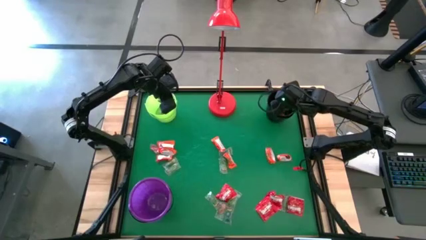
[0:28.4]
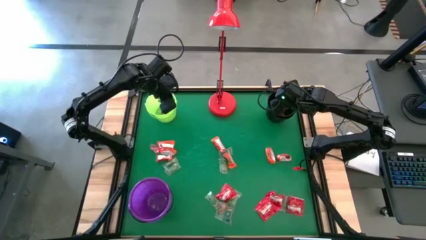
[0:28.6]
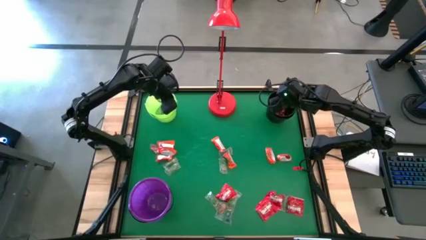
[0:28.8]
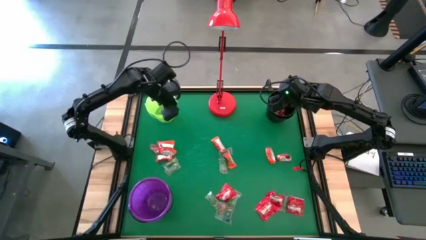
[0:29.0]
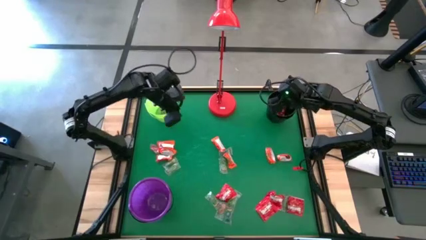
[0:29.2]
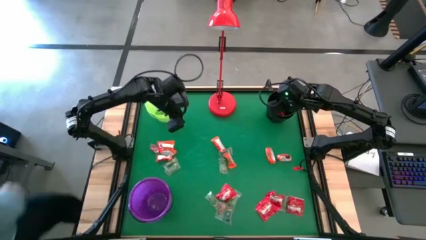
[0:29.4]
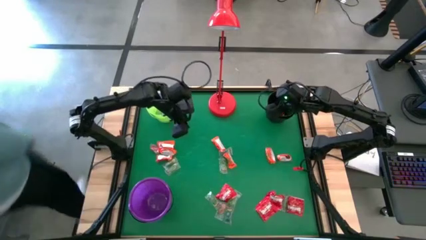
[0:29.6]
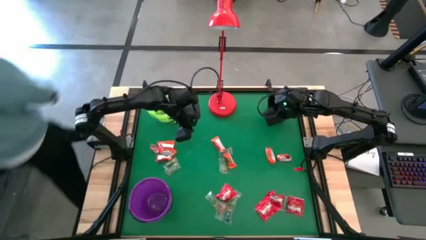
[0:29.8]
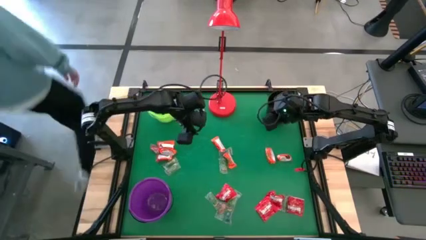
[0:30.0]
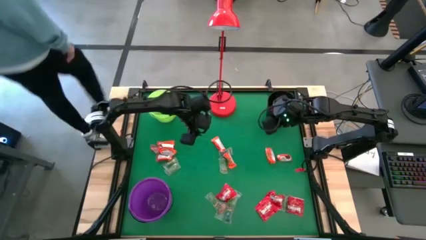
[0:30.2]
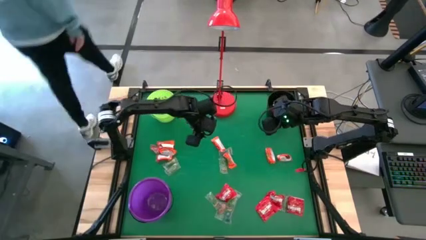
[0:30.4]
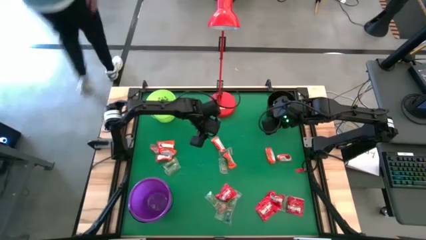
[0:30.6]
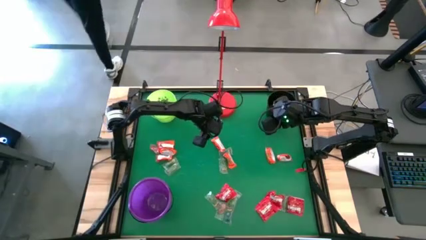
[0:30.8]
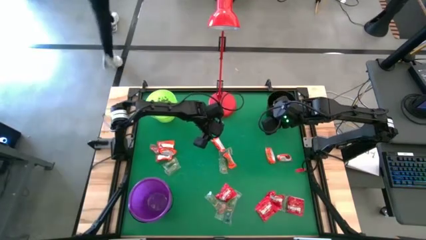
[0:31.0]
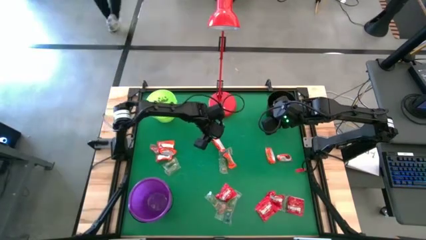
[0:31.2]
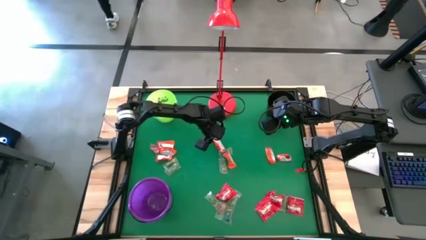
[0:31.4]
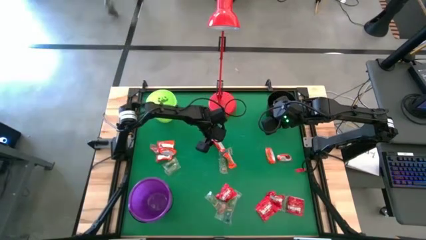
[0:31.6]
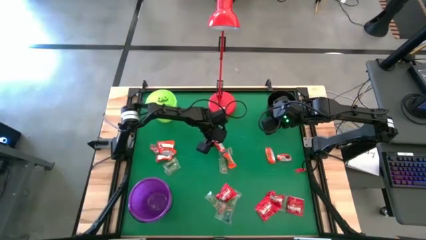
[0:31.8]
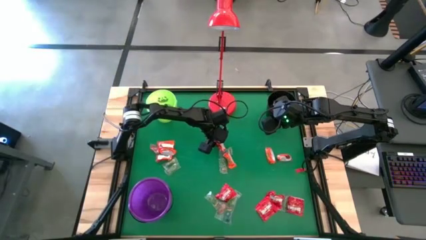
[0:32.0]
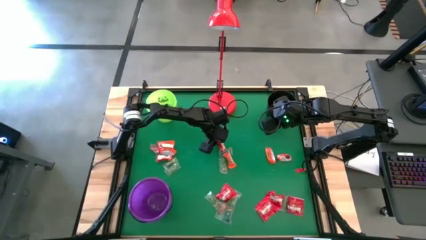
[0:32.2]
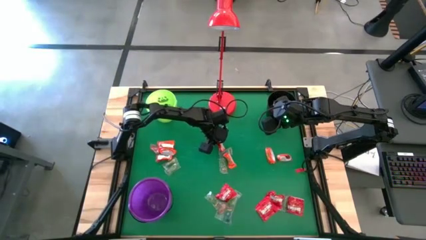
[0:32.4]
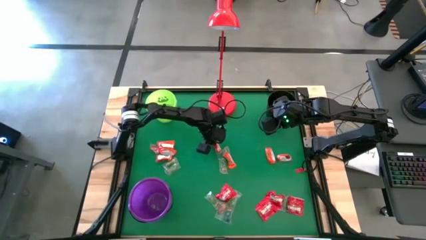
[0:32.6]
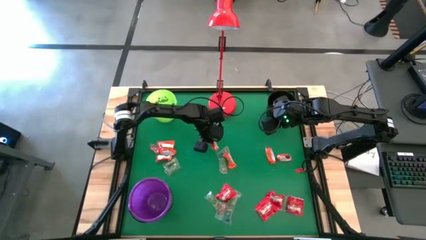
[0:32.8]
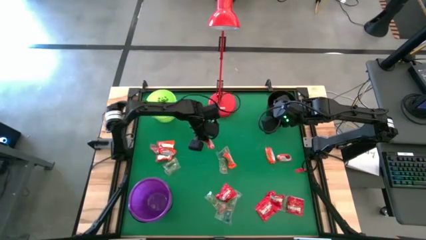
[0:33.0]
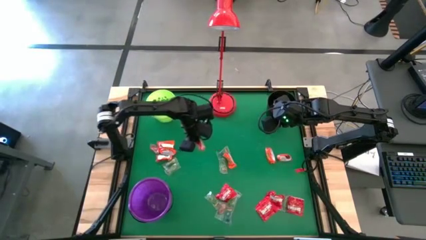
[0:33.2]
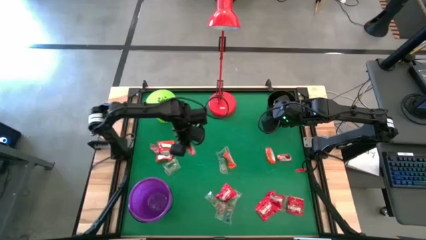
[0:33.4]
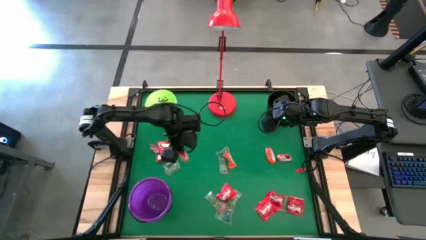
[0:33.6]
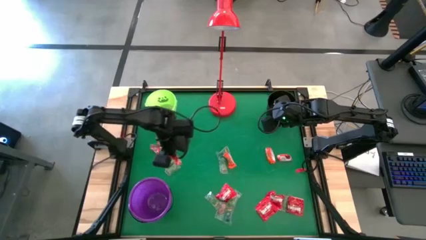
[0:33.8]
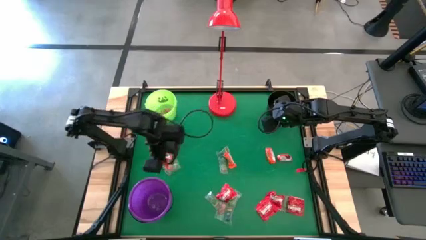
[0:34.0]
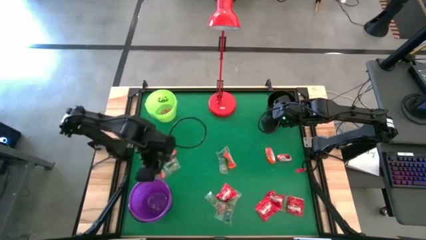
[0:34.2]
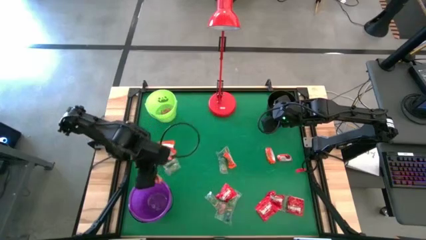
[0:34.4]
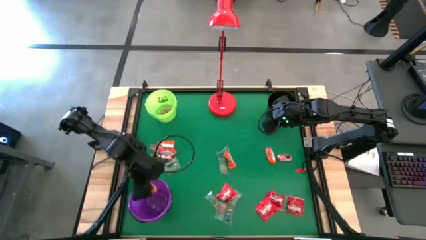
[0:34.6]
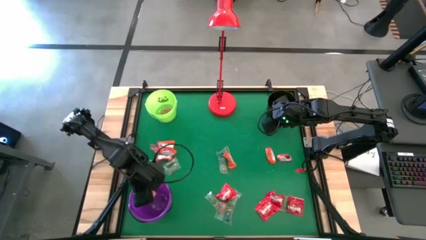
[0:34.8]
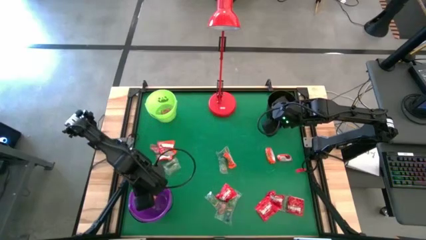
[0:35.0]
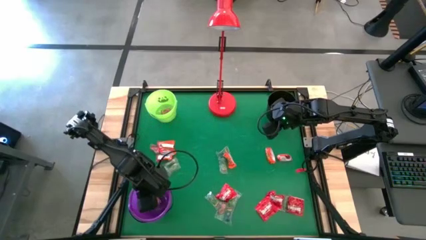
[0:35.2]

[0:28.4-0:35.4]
Task: Sort candy
Put the orange candy into the violet bucket

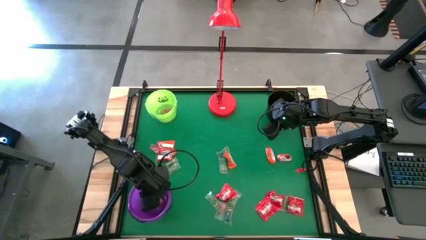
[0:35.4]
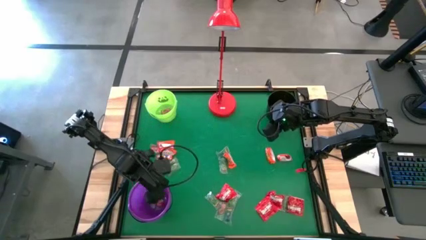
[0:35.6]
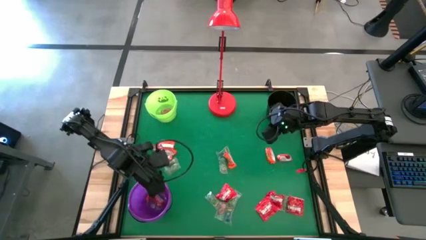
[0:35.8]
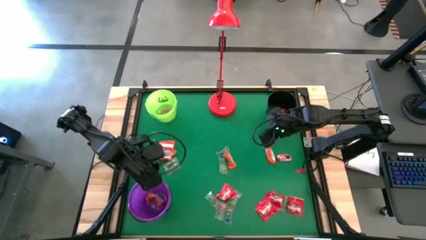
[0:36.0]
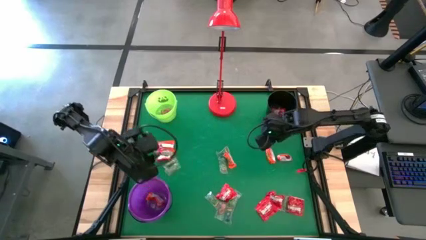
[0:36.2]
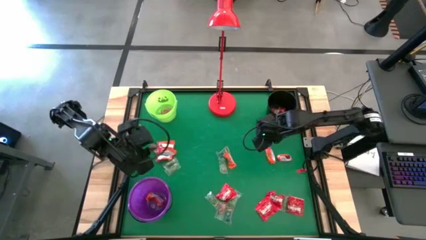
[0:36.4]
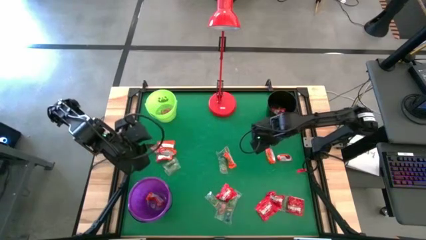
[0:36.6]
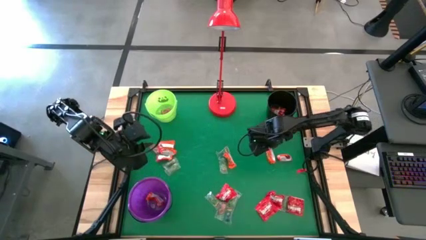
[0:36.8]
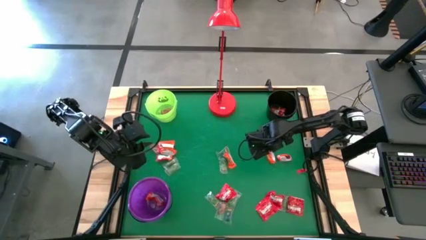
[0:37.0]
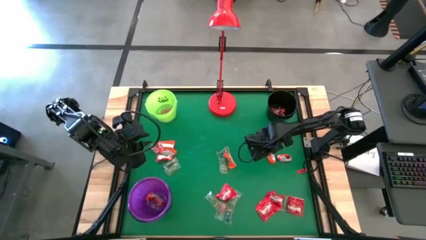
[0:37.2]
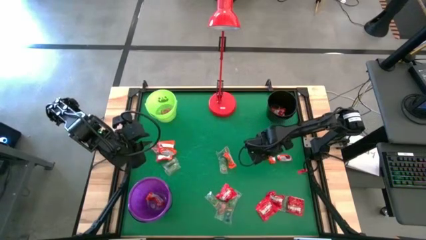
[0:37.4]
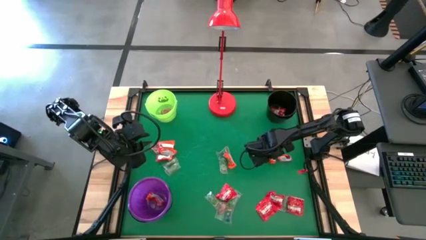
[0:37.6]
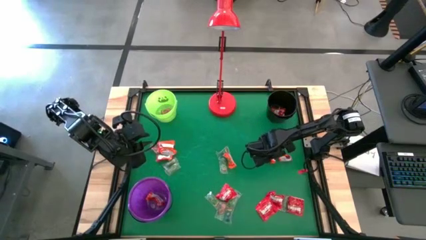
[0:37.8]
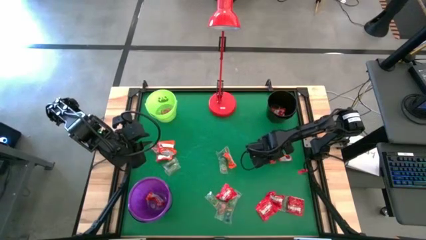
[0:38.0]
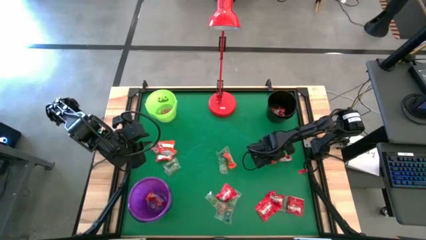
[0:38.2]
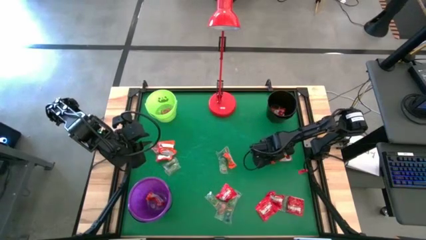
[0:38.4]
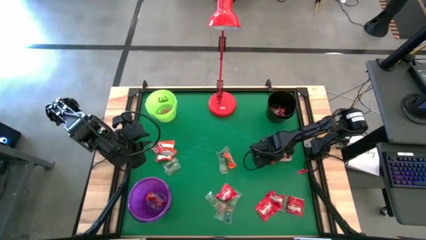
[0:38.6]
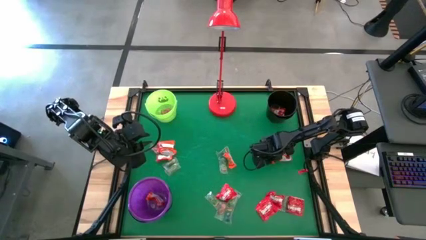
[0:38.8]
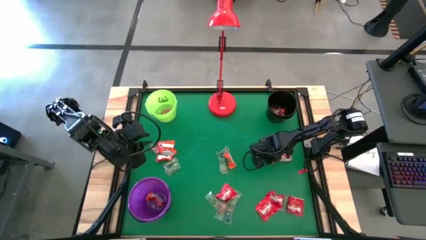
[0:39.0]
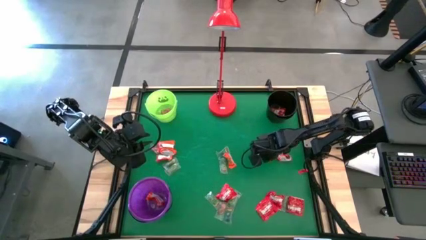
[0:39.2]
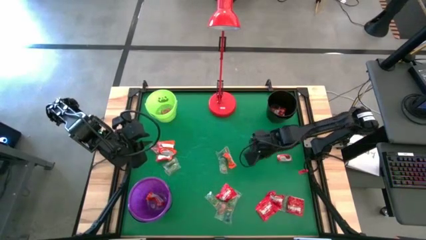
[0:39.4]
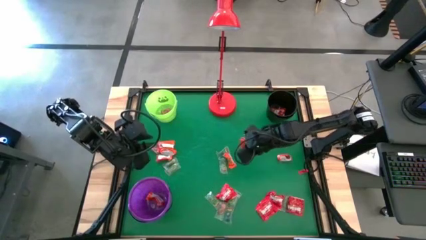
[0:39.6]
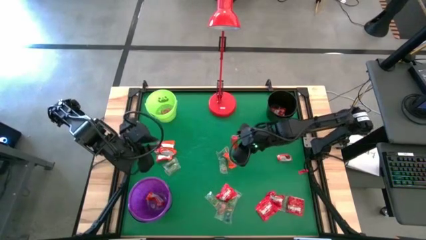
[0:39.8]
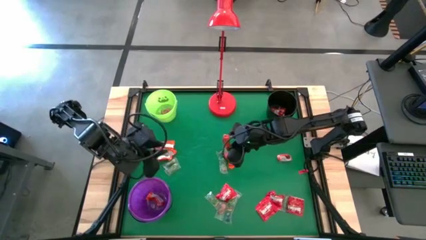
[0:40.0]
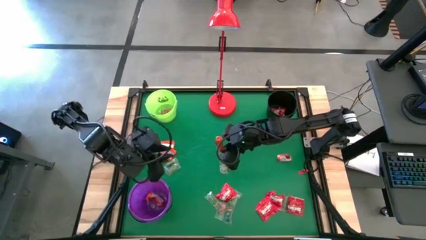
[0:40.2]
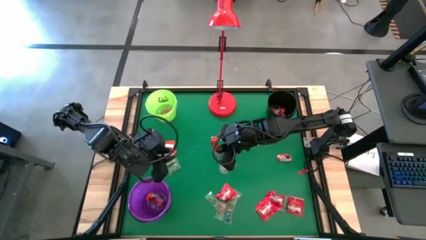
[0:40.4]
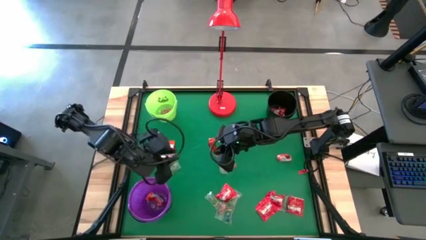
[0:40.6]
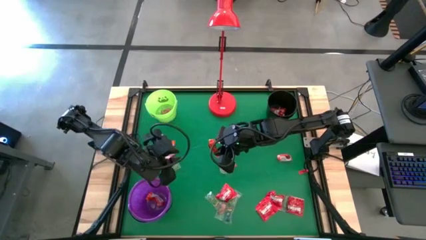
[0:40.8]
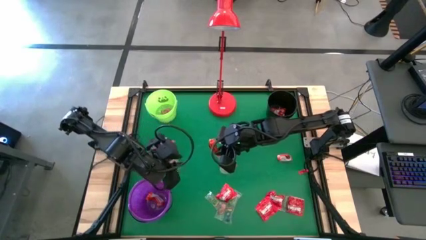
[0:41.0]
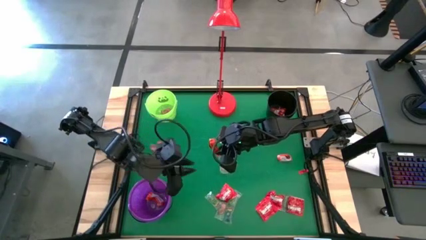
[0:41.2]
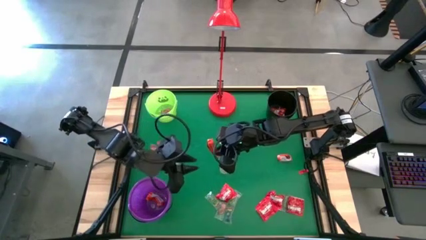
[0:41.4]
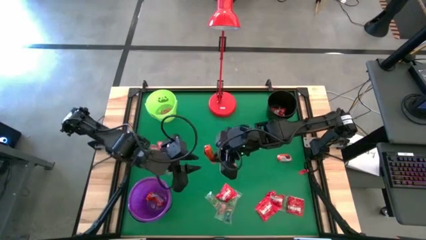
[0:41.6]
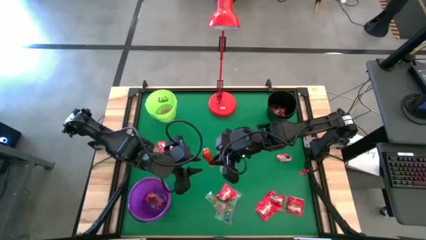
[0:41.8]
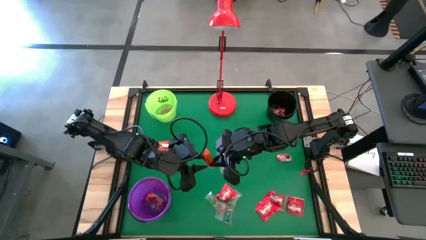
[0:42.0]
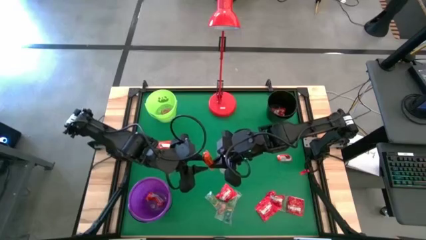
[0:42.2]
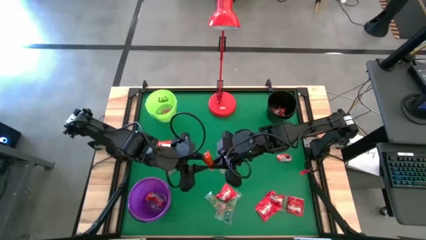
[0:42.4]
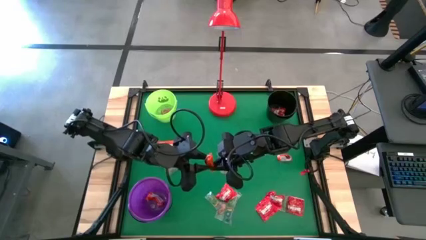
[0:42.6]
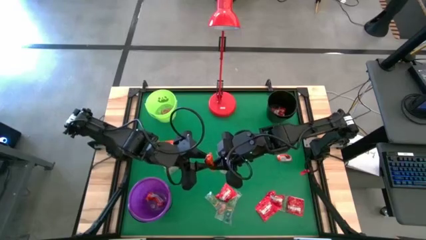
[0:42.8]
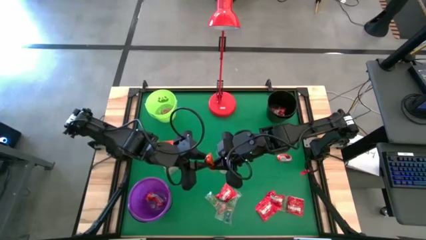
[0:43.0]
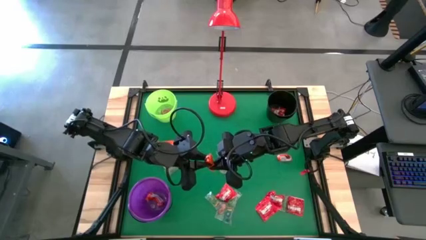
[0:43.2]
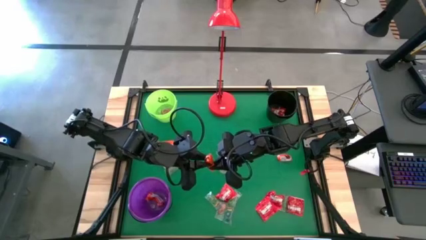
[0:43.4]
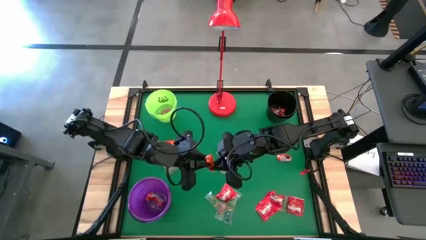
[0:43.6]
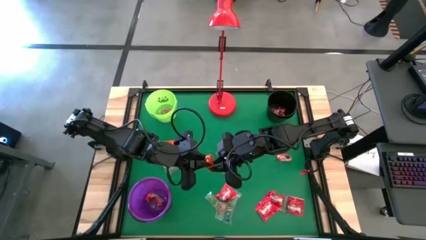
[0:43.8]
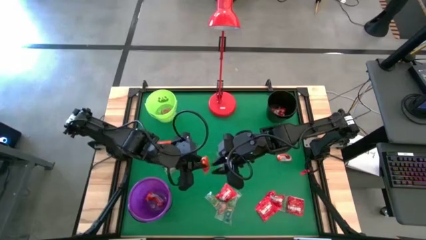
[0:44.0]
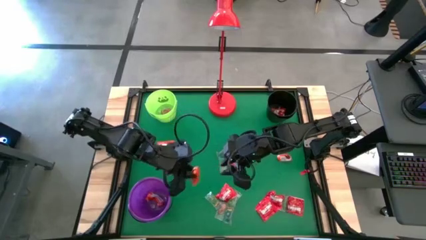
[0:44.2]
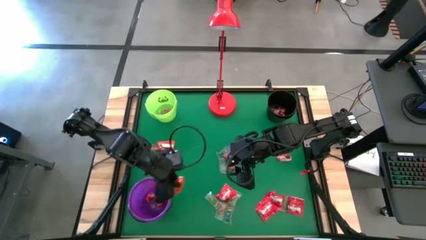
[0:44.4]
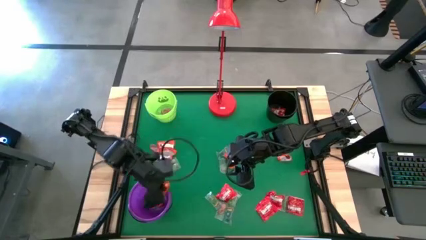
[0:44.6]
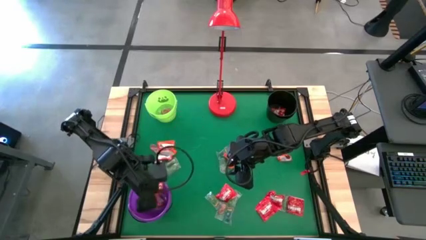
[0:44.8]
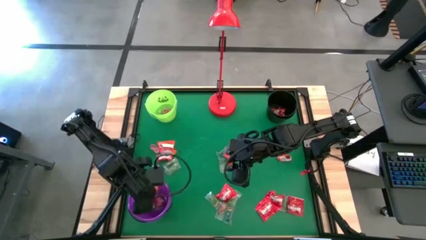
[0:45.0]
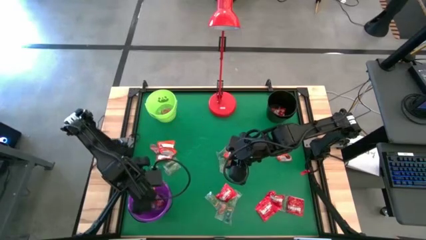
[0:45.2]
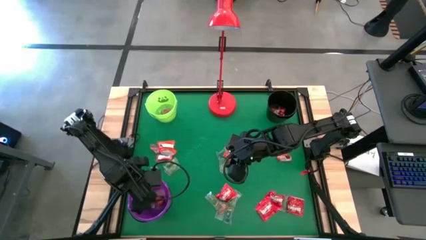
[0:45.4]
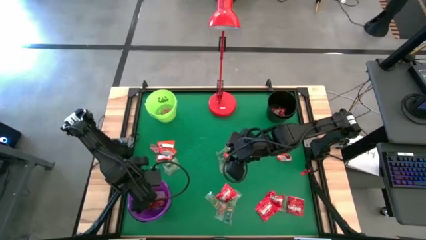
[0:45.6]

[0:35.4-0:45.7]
Put the orange candy into the violet bucket
